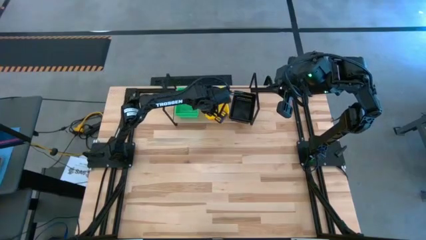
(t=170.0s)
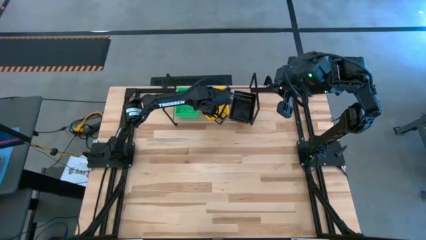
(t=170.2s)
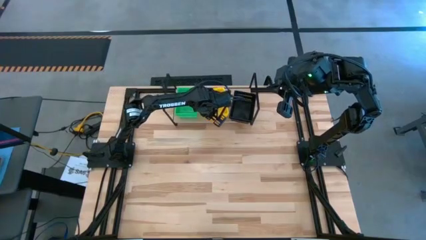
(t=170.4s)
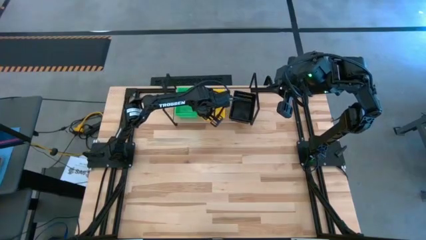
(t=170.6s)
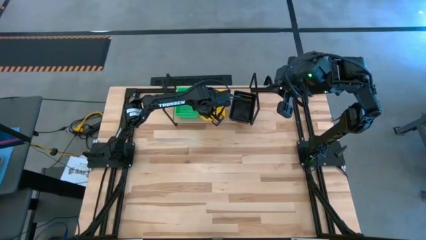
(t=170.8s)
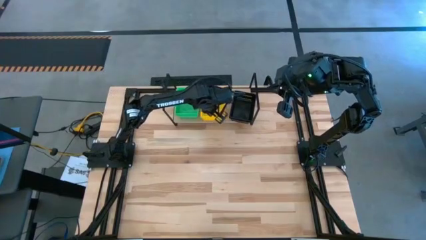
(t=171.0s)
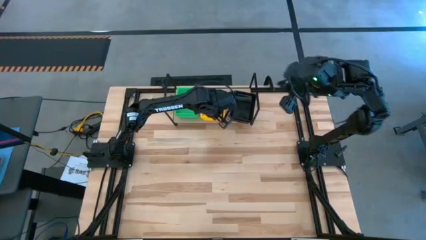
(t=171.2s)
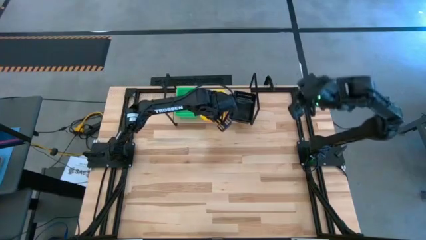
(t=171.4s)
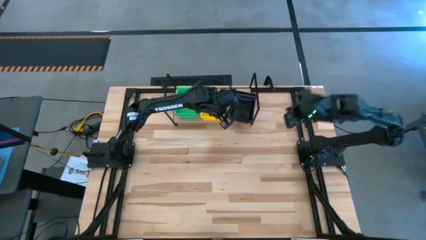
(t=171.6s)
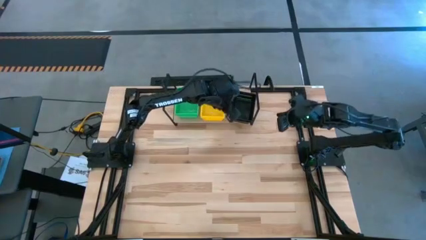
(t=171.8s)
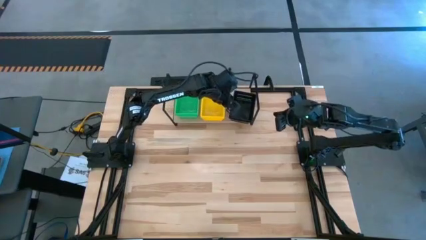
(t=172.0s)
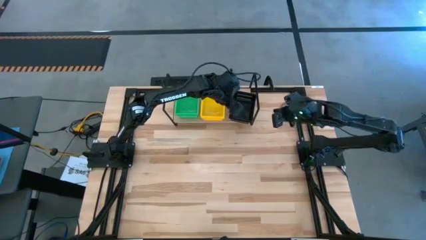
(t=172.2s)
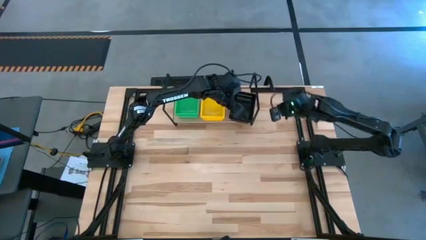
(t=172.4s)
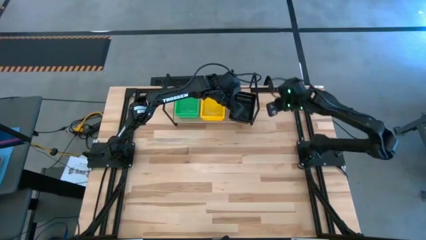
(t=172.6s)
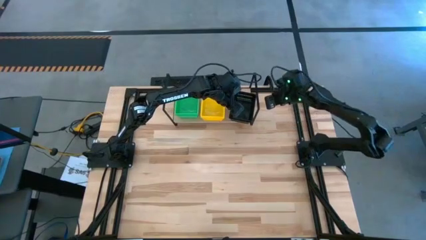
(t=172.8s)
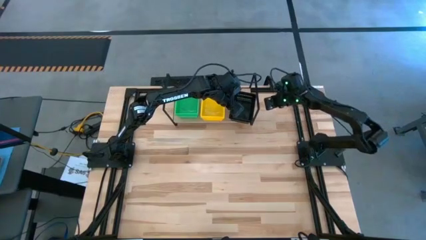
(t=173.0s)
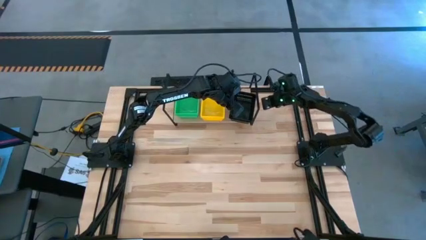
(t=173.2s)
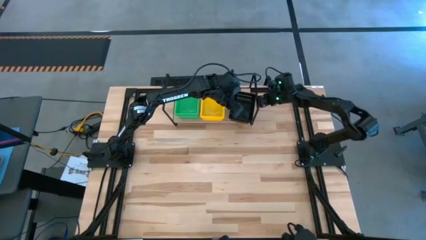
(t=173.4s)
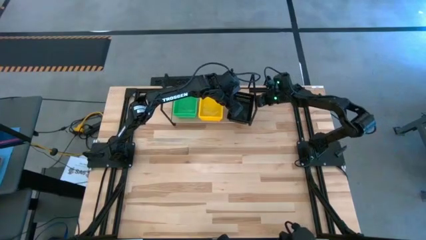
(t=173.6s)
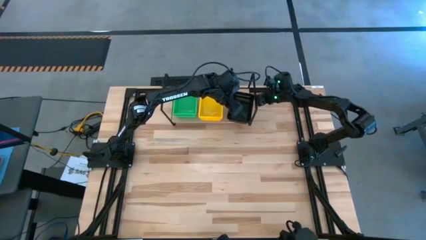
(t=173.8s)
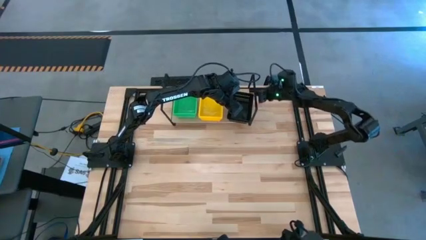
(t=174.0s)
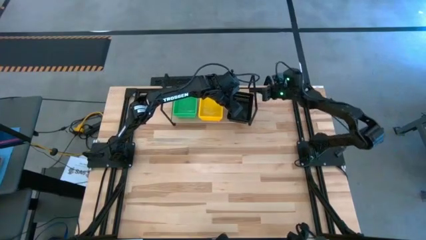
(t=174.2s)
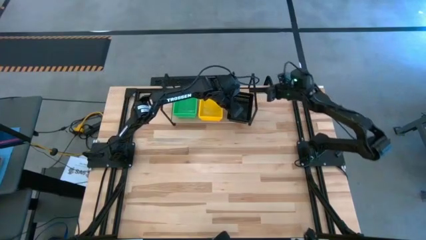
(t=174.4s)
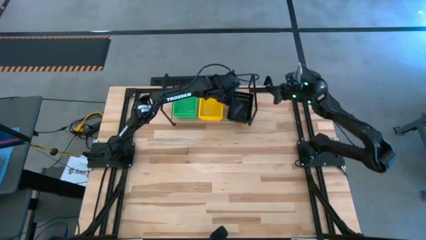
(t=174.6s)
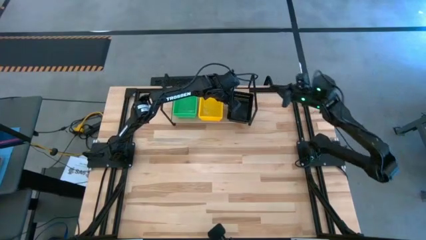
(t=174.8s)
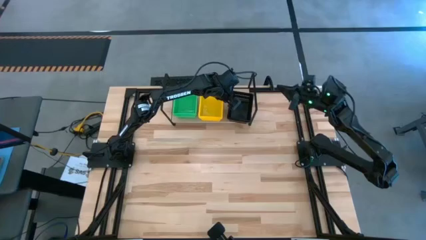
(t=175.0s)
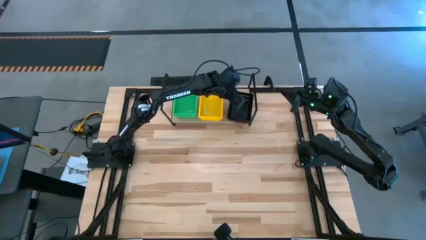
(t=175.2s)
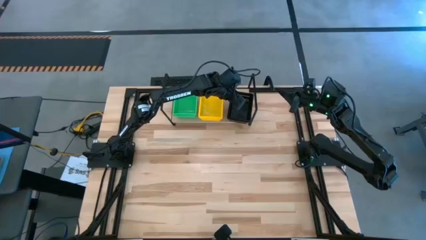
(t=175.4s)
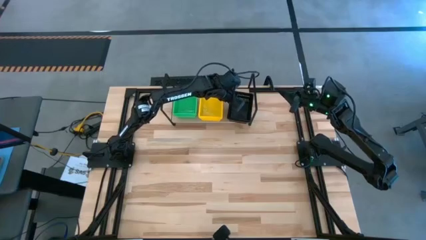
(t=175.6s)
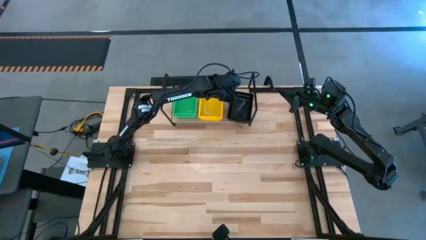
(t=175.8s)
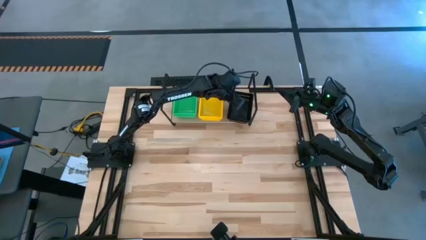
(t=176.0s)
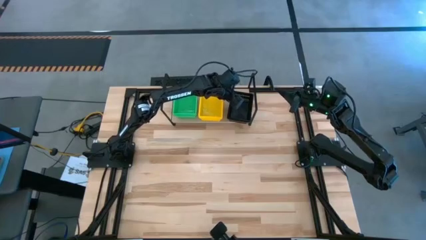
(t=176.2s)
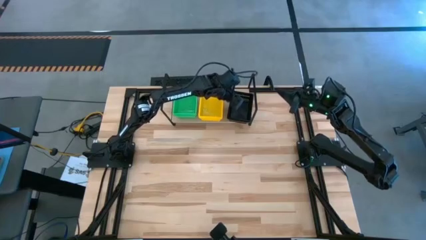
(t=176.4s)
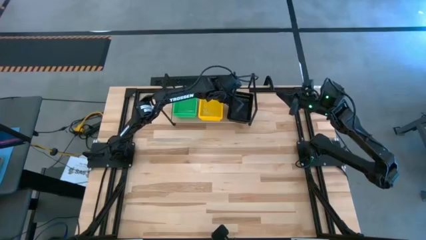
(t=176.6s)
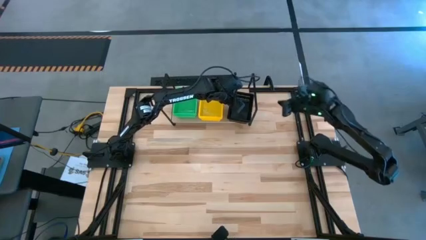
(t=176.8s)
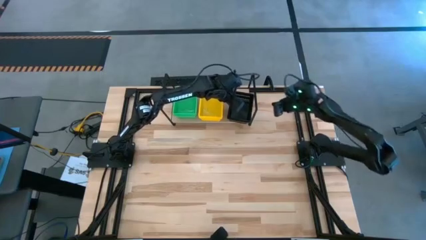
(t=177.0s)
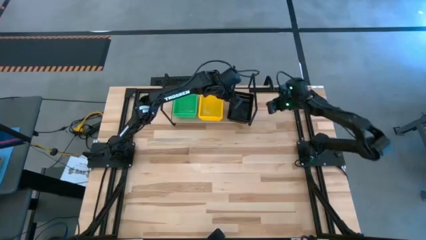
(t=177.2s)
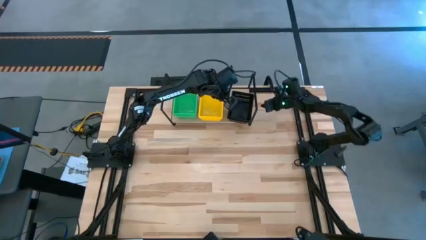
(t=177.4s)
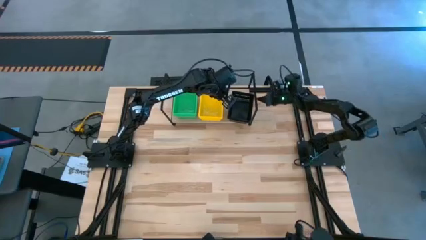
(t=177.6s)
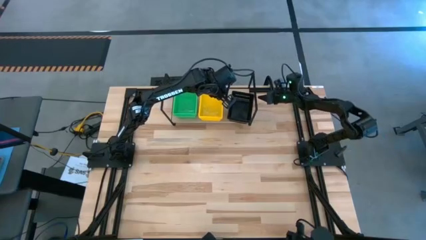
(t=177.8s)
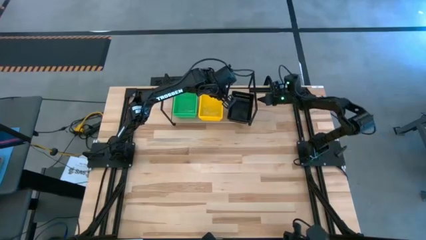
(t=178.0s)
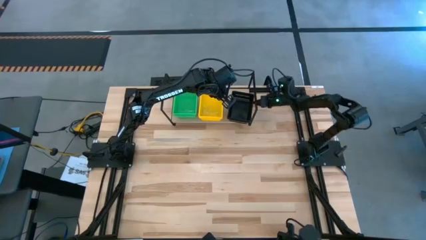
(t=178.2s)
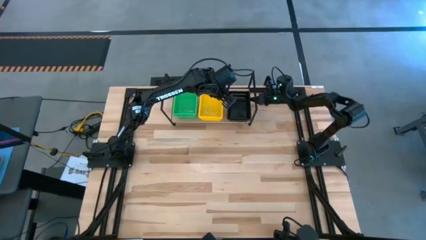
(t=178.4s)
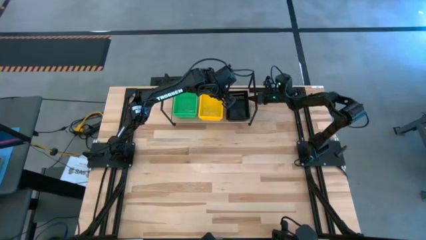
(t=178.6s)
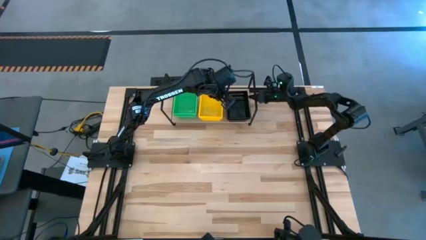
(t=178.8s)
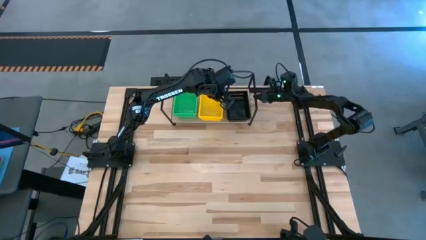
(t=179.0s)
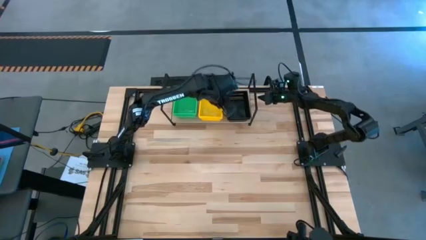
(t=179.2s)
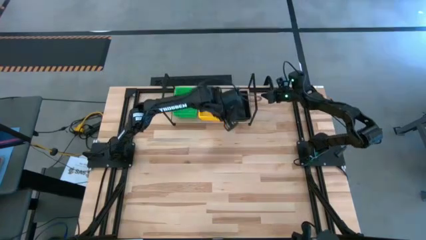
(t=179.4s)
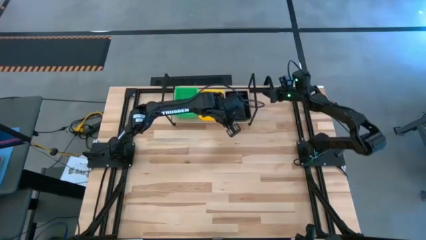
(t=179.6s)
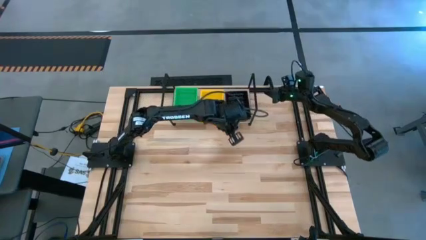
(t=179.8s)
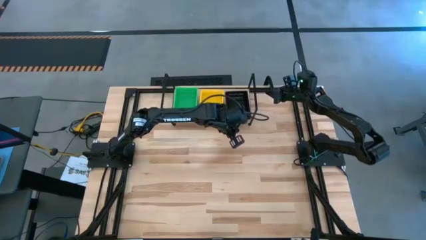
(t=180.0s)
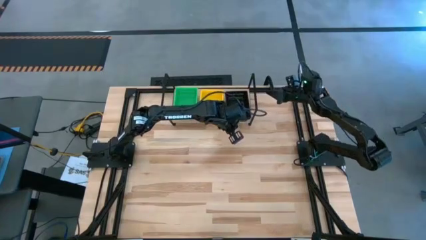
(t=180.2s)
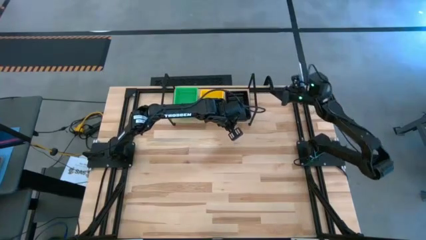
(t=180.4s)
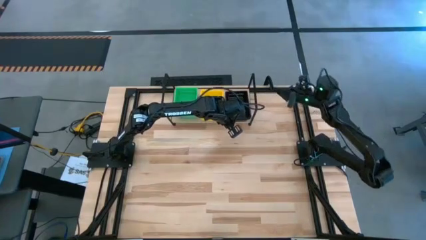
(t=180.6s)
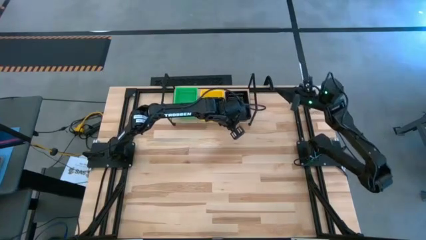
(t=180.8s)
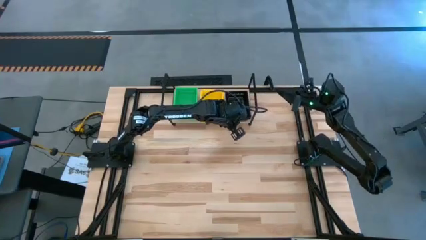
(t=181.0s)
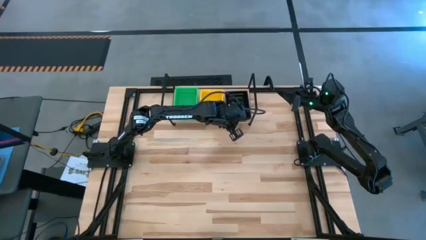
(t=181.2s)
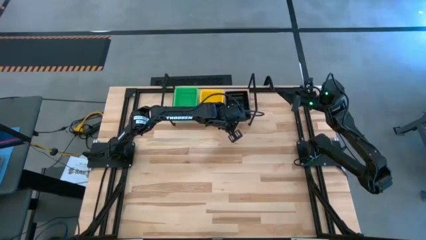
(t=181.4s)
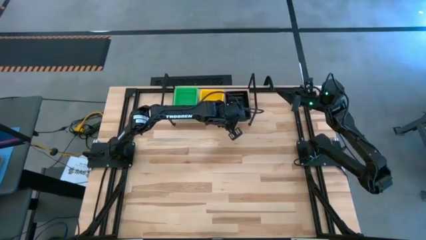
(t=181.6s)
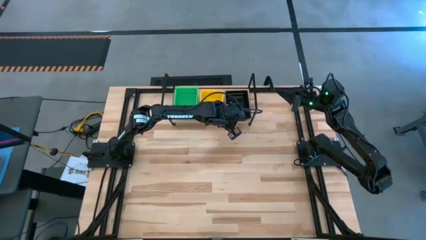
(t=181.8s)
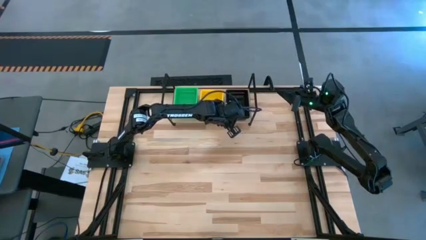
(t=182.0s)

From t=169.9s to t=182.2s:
Task: Stack baskets on shelf by color
Adjust the stacked colored bins on the shelf
